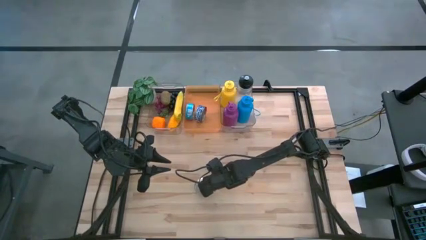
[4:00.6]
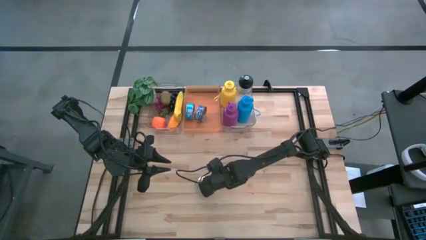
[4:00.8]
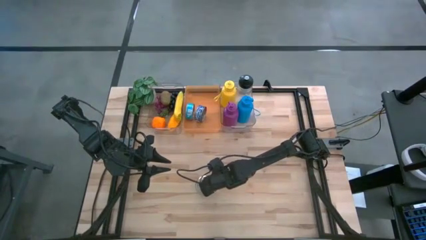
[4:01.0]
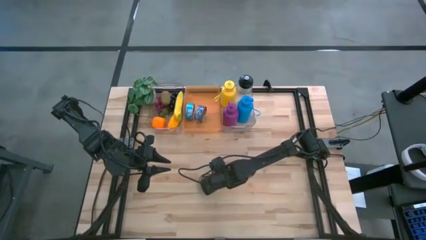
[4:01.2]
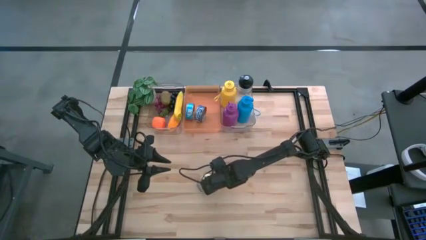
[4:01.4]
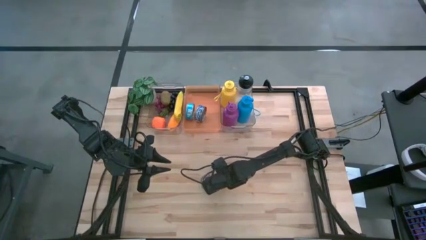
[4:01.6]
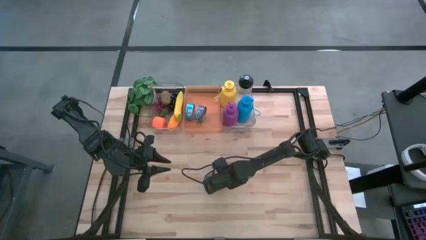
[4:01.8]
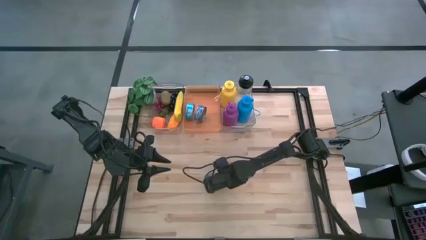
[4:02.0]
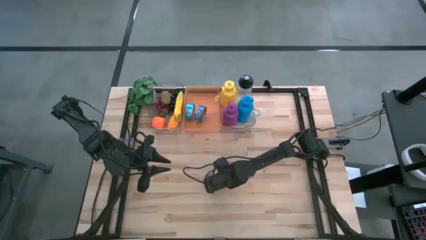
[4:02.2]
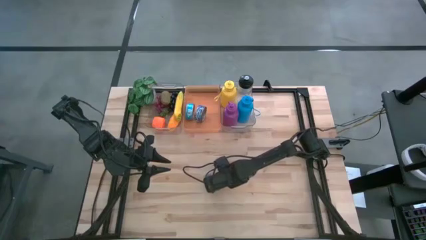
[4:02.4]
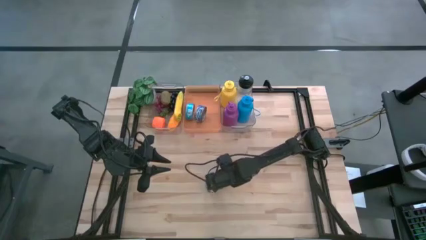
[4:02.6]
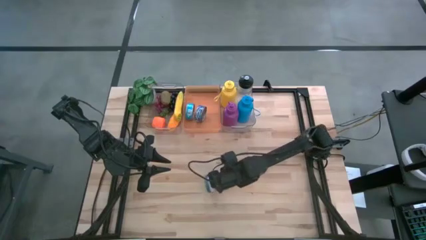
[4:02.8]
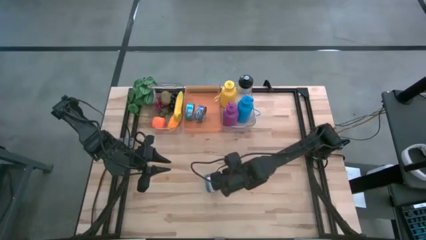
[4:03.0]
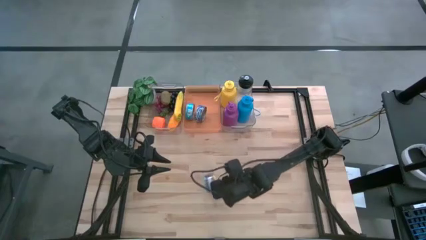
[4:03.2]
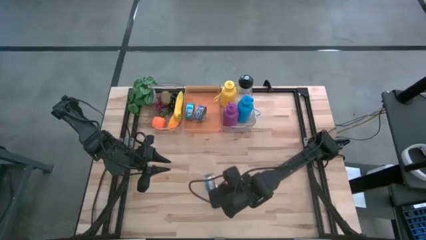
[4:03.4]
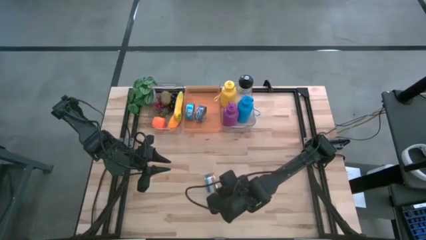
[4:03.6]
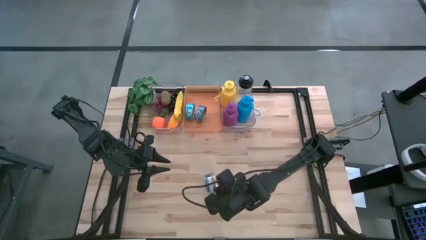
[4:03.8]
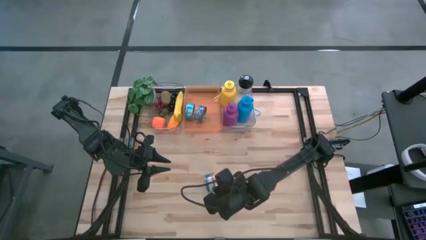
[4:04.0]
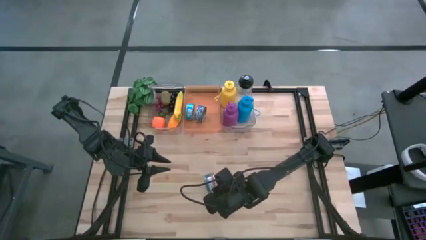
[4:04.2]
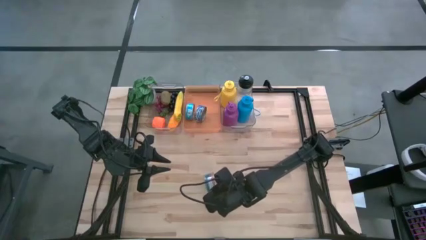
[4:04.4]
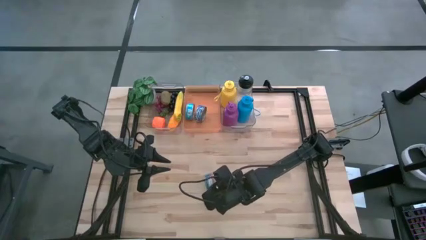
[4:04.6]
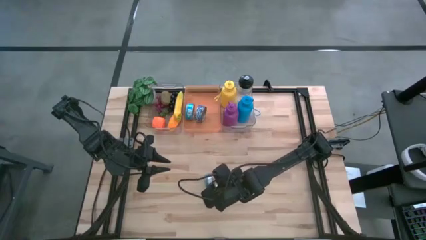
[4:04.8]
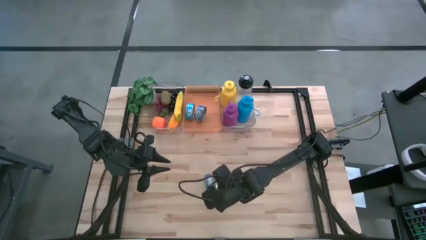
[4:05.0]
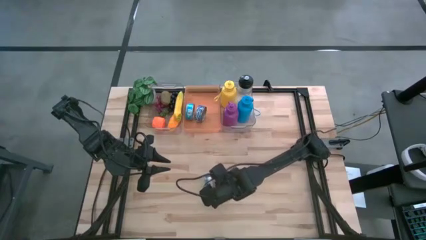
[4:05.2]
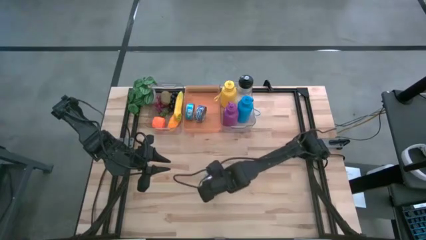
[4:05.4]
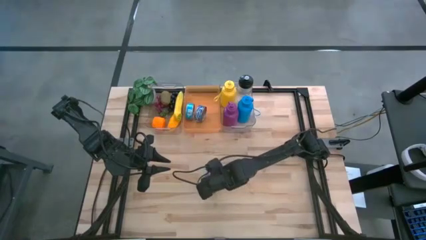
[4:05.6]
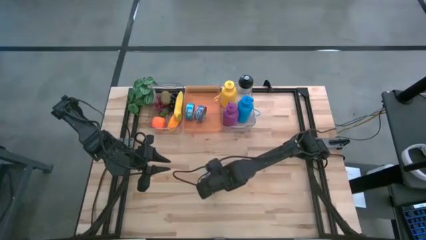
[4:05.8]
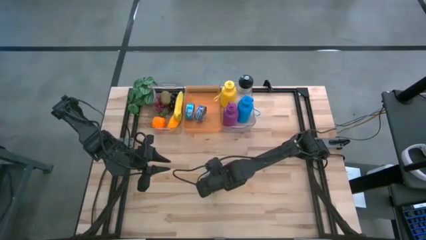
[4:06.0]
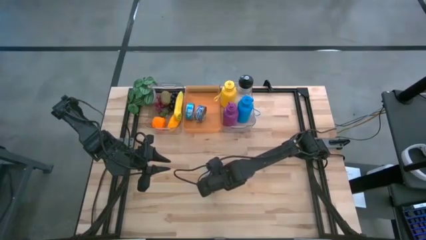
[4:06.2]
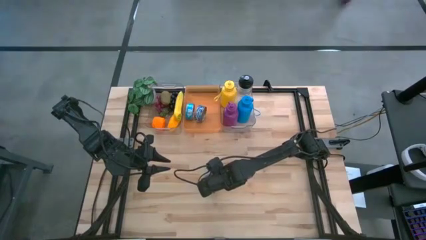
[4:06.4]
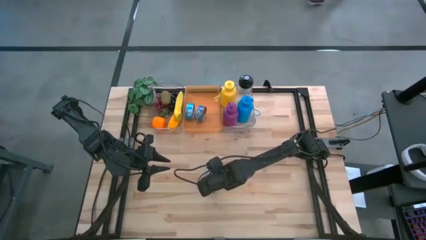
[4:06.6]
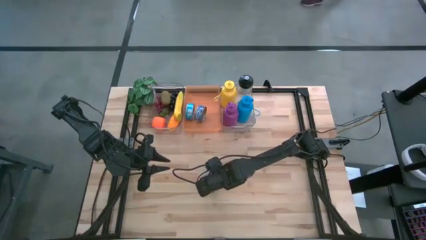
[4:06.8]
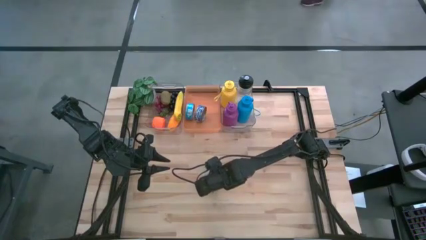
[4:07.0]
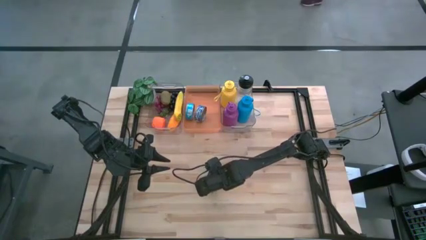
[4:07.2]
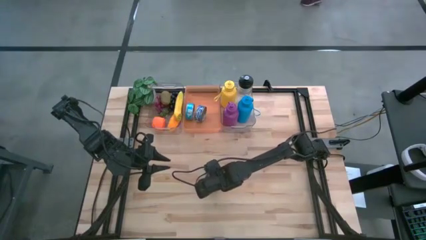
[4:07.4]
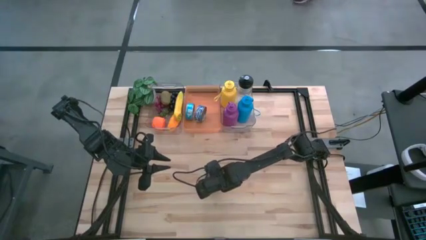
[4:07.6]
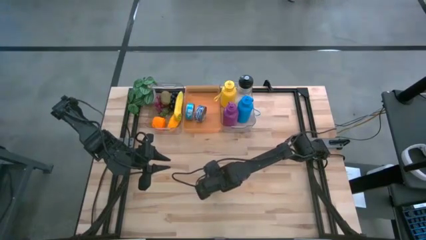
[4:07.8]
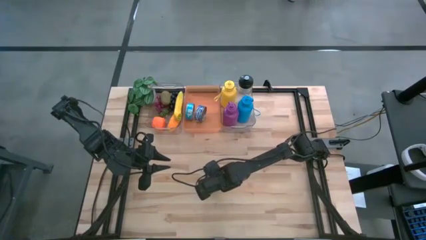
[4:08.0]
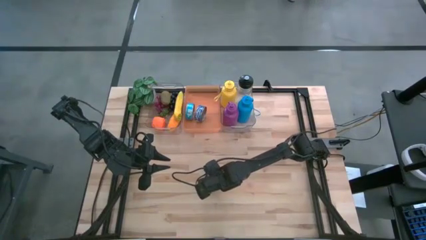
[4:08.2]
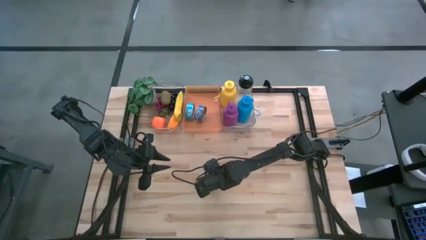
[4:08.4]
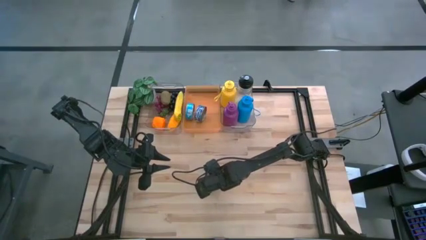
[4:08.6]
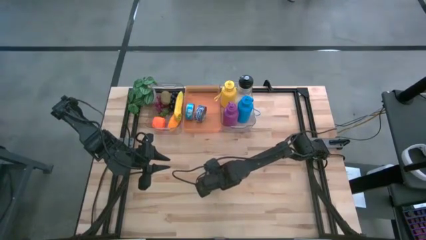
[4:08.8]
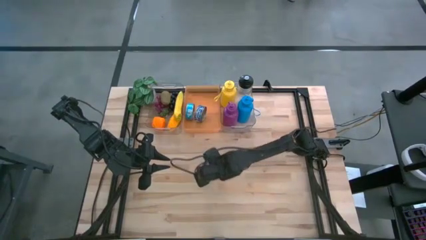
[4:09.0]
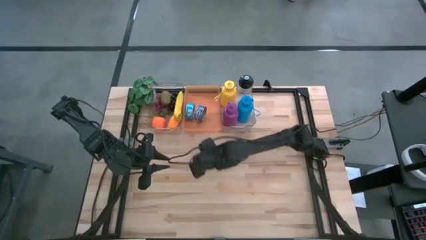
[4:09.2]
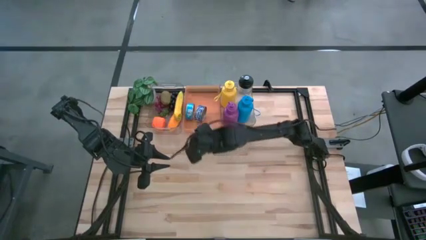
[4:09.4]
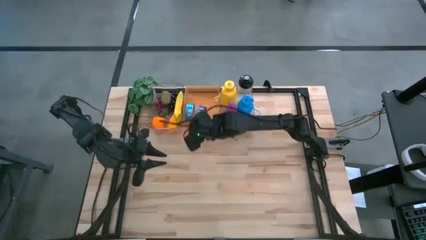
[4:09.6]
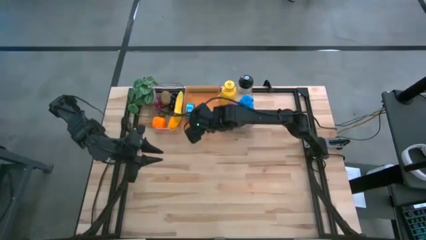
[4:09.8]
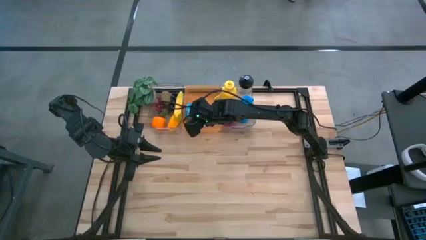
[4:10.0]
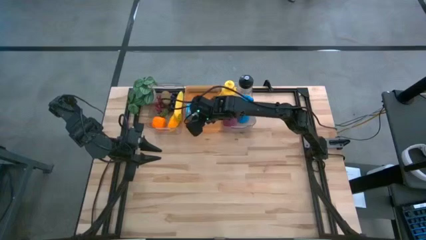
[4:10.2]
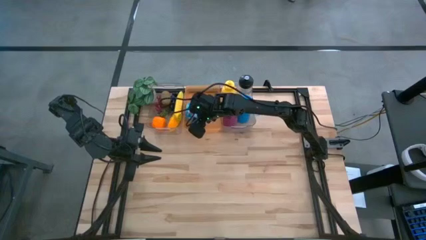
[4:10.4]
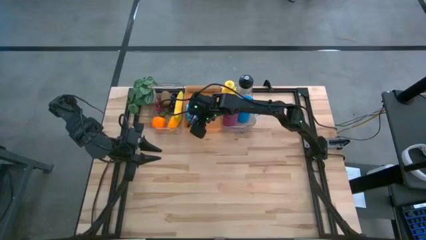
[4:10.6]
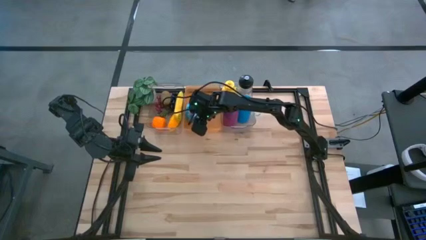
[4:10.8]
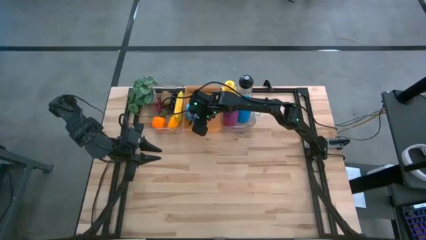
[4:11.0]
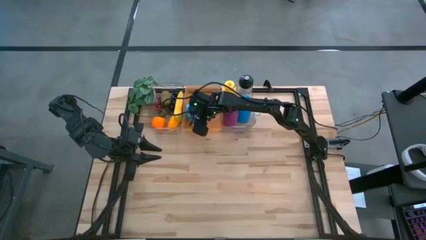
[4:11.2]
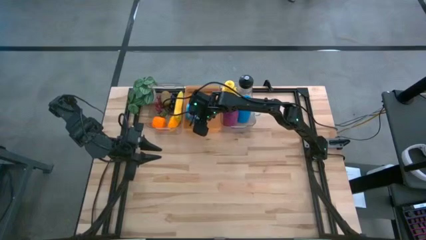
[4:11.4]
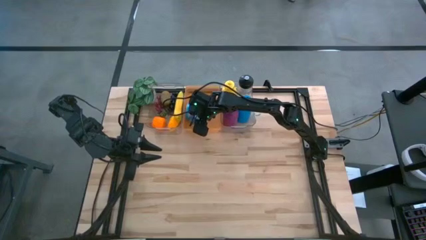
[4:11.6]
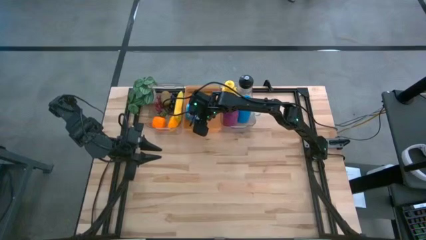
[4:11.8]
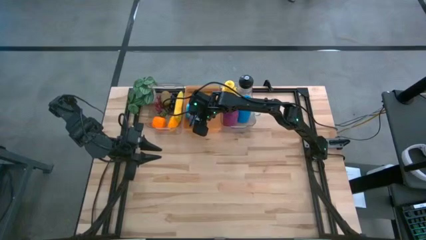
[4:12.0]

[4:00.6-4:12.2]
Task: Pick & Place Food Item
Put the blue and pink tuna can into the orange bin

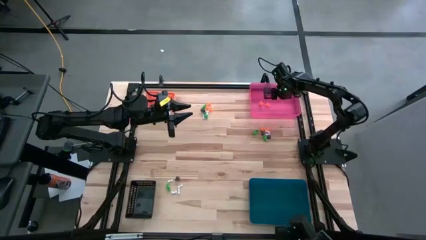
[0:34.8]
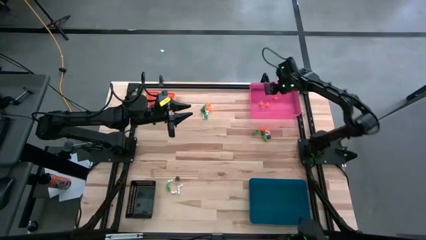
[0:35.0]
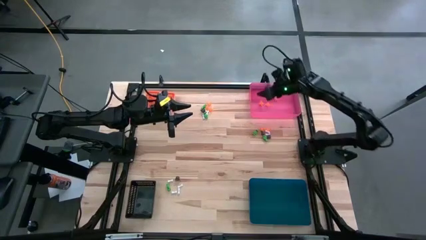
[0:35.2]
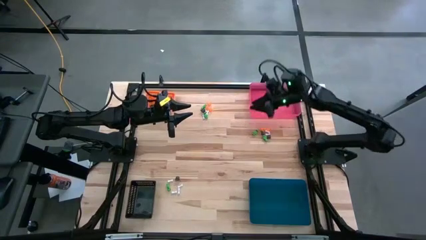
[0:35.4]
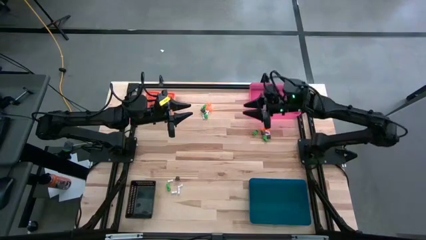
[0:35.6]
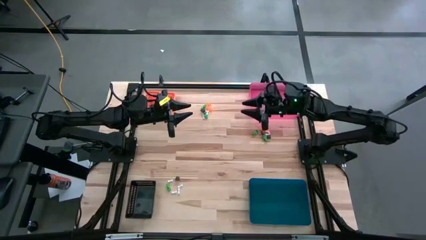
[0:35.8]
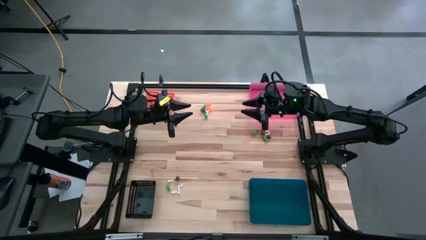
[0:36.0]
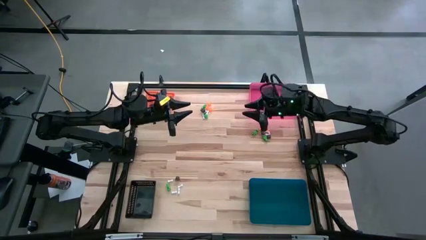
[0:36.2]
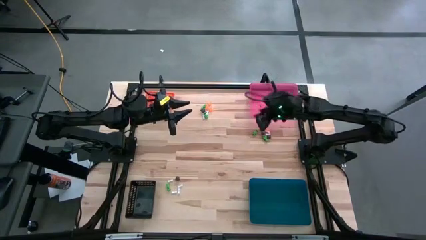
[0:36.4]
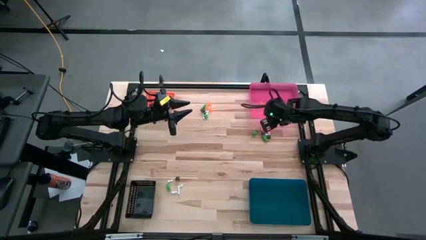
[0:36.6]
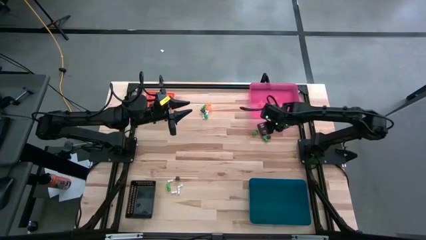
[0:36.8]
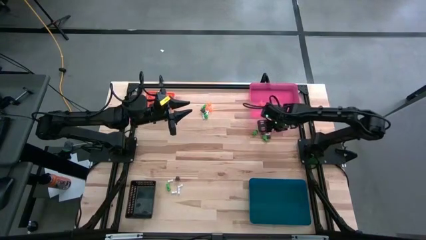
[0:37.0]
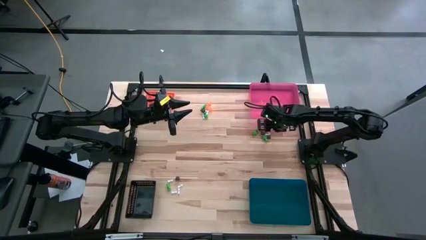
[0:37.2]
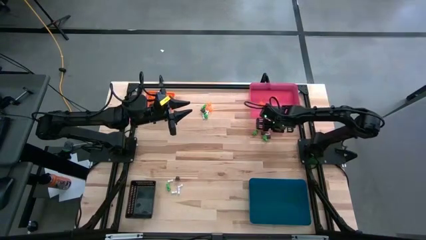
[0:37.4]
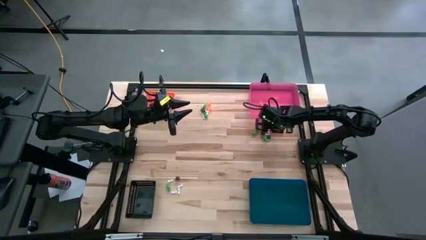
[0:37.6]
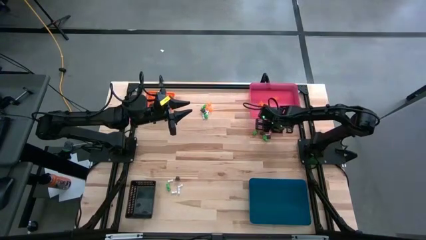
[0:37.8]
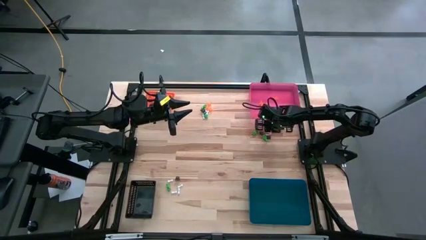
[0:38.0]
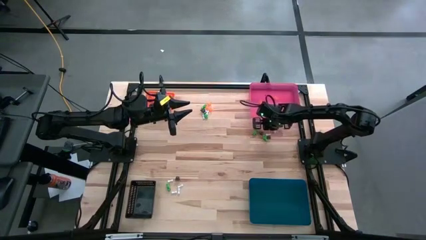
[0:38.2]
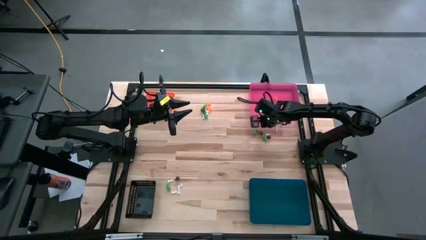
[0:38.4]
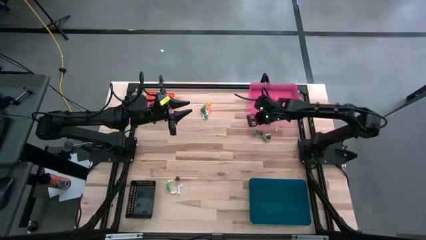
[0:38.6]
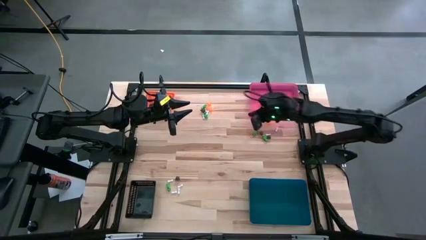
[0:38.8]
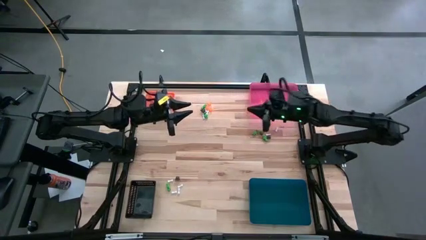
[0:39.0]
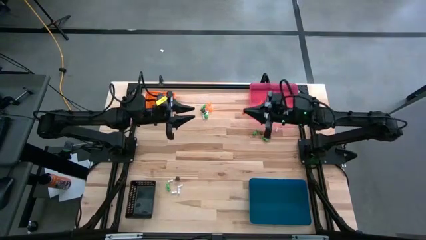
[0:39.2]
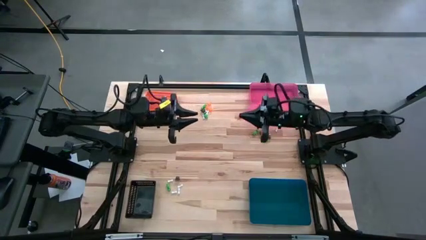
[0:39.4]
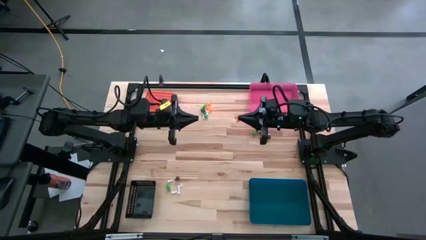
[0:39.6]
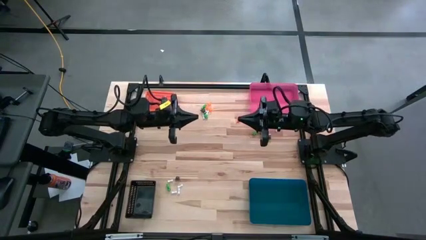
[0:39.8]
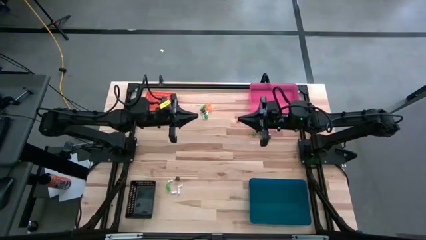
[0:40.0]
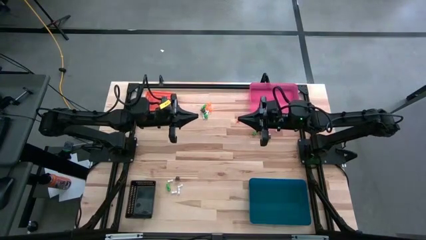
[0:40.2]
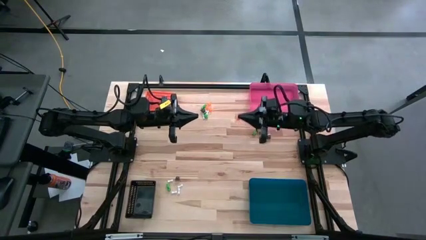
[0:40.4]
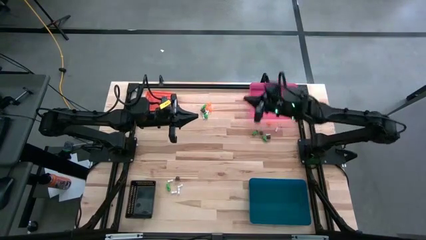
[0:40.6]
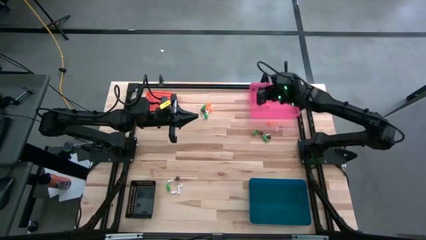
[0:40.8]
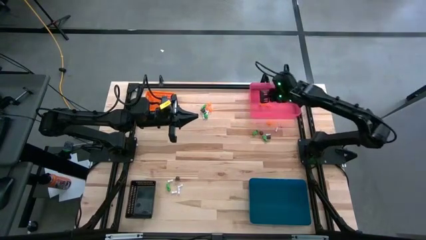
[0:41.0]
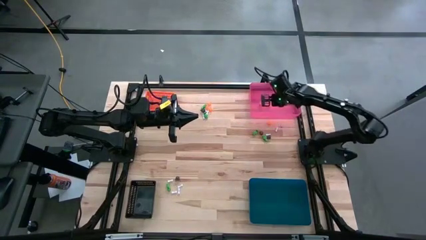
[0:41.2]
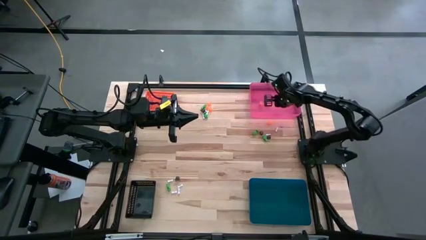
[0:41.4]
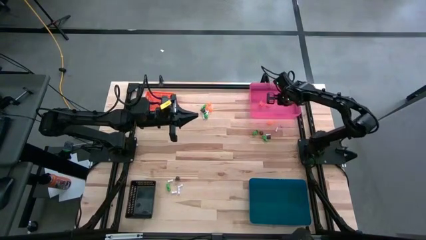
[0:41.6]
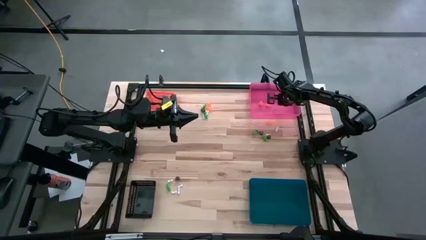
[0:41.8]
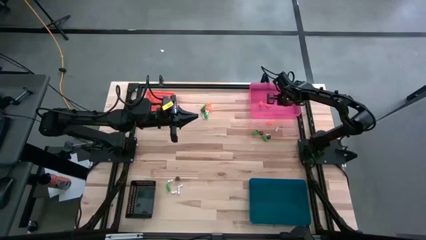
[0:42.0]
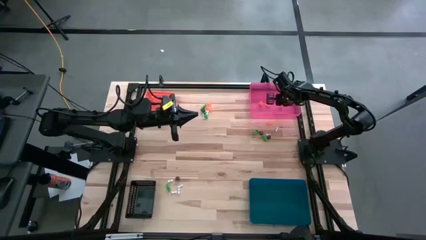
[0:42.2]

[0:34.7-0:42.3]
Task: Sort Halloween decoration
Put the orange spider toy into the pink bin
